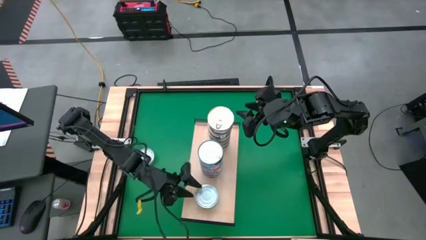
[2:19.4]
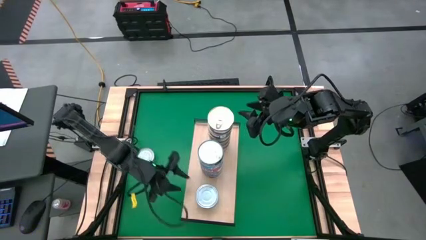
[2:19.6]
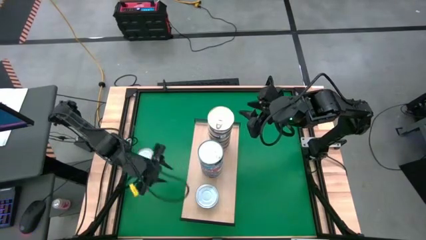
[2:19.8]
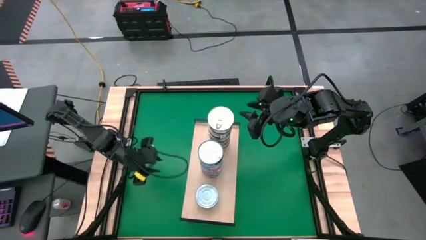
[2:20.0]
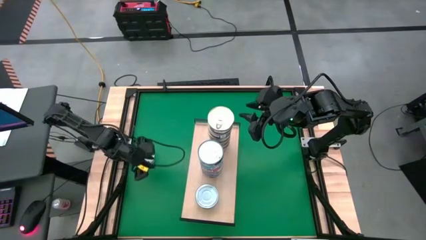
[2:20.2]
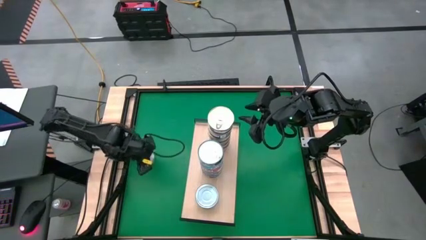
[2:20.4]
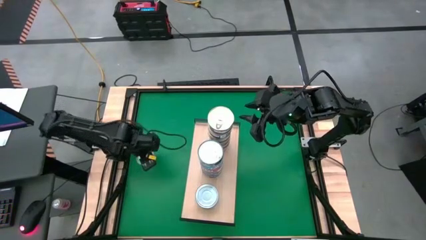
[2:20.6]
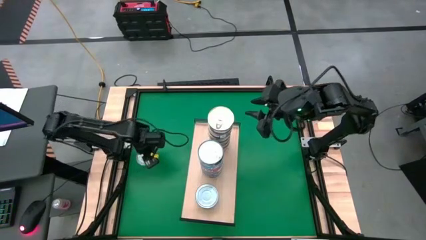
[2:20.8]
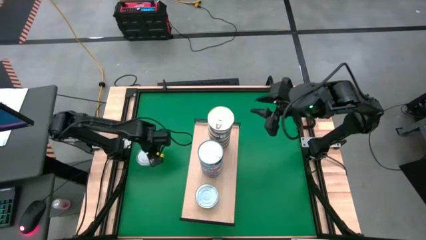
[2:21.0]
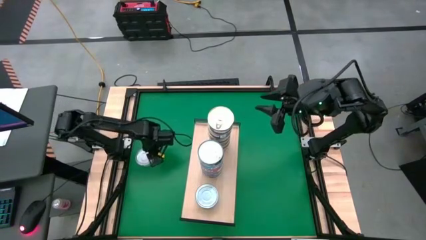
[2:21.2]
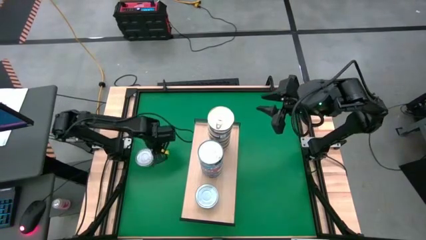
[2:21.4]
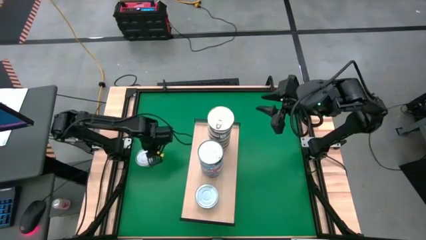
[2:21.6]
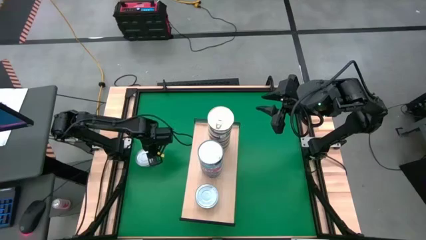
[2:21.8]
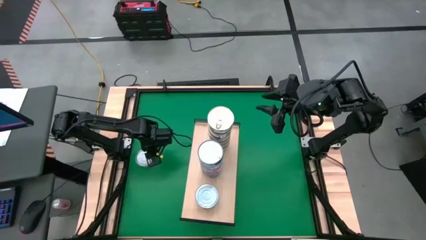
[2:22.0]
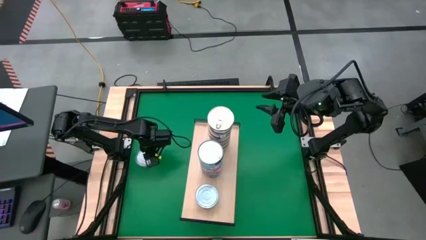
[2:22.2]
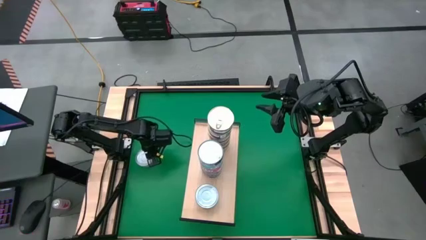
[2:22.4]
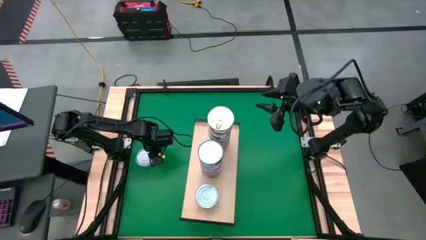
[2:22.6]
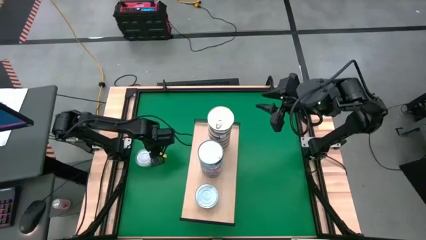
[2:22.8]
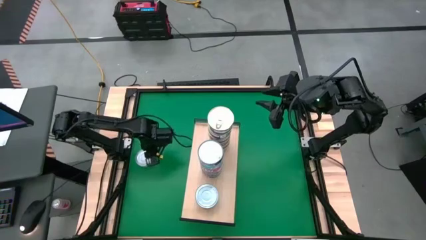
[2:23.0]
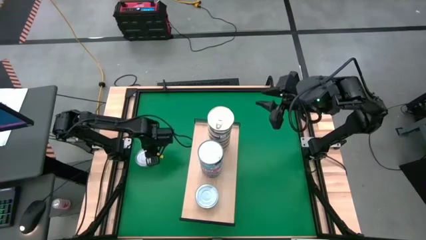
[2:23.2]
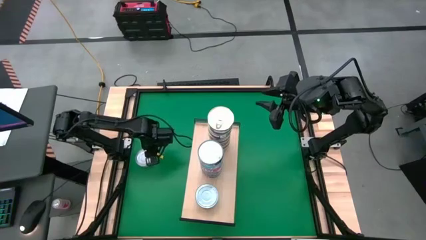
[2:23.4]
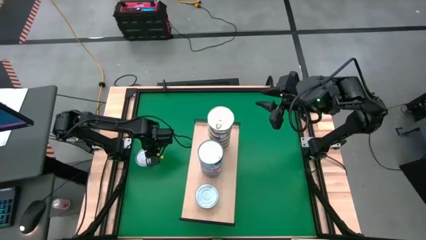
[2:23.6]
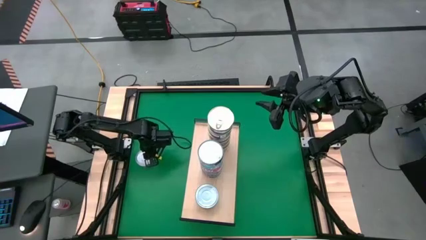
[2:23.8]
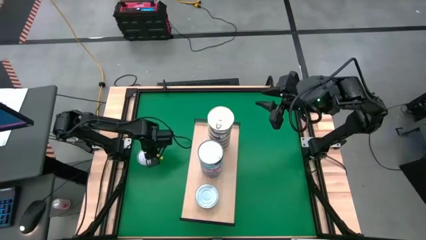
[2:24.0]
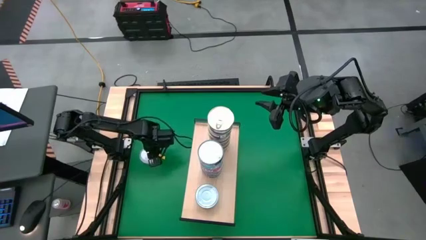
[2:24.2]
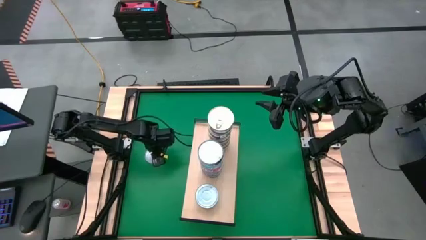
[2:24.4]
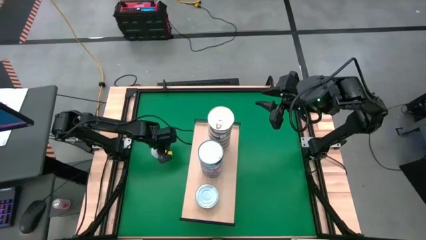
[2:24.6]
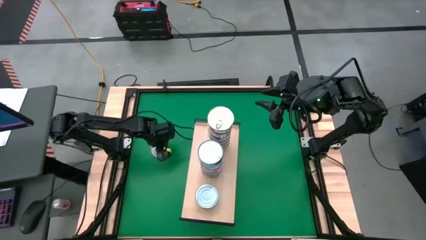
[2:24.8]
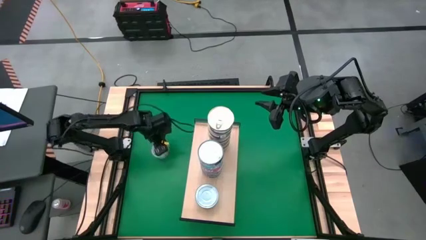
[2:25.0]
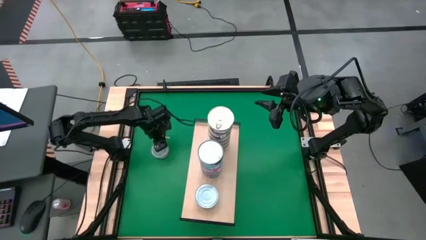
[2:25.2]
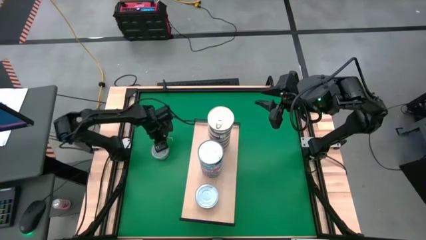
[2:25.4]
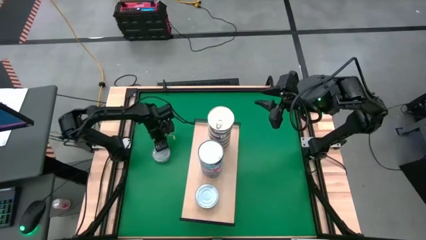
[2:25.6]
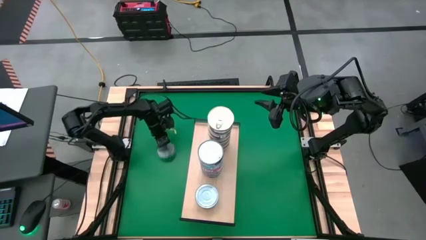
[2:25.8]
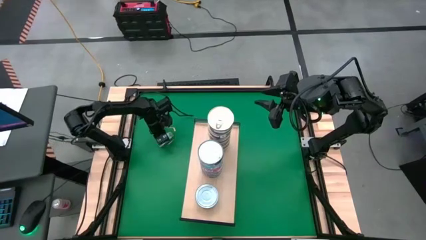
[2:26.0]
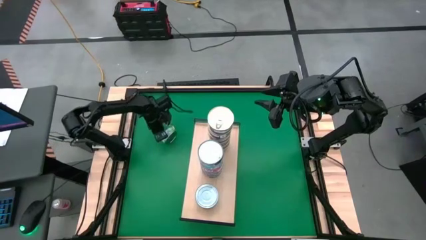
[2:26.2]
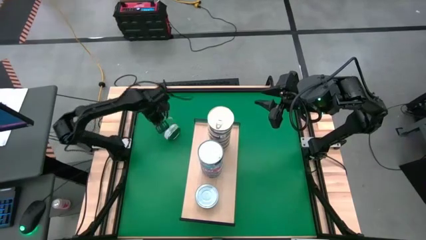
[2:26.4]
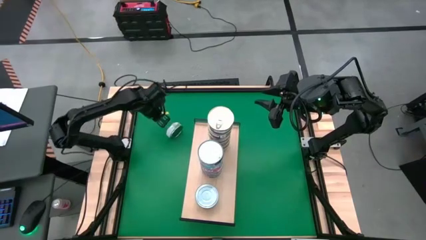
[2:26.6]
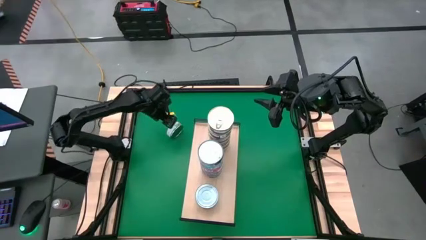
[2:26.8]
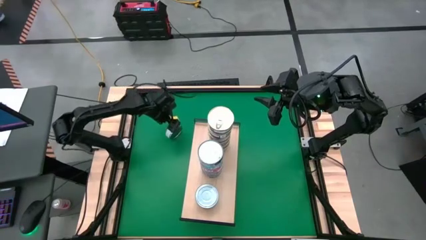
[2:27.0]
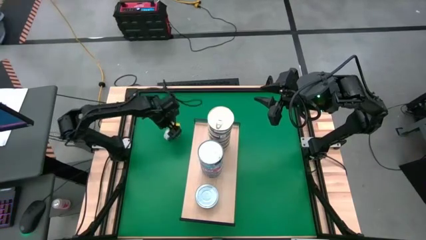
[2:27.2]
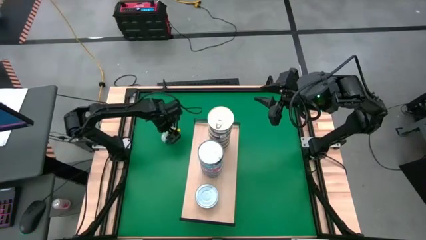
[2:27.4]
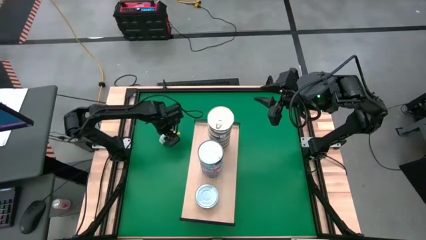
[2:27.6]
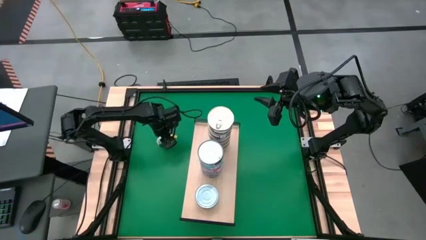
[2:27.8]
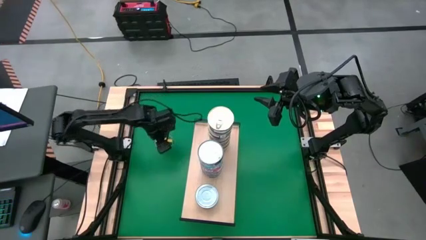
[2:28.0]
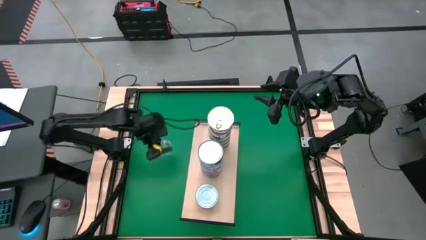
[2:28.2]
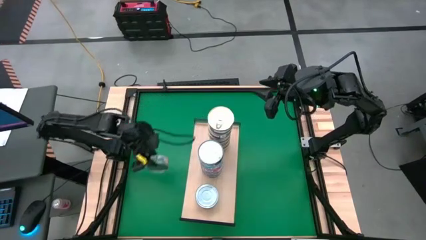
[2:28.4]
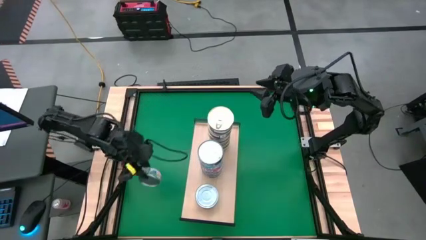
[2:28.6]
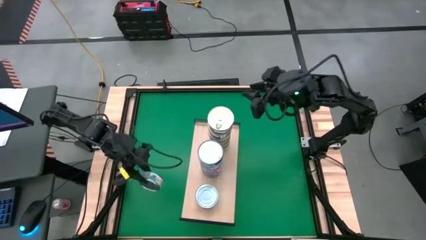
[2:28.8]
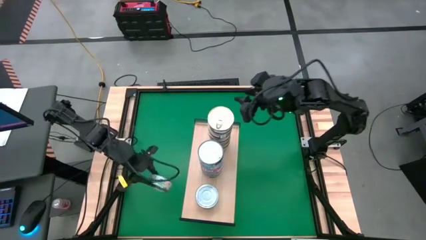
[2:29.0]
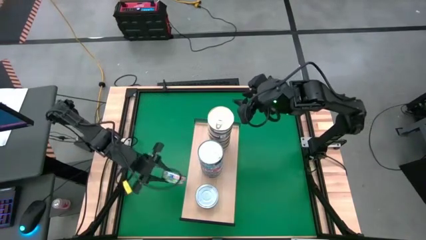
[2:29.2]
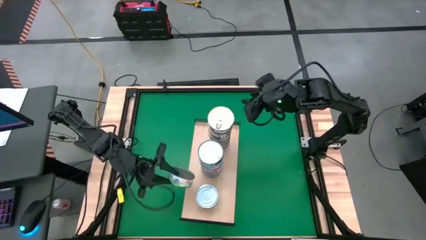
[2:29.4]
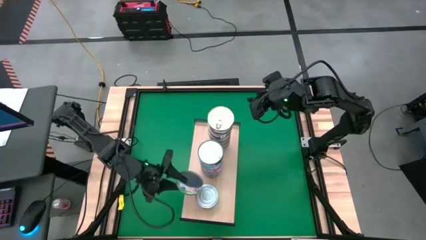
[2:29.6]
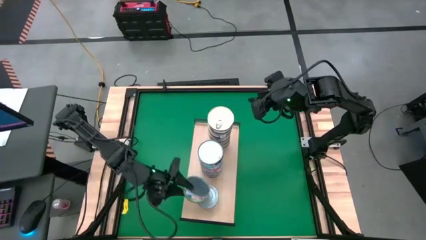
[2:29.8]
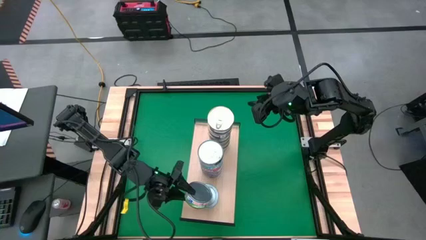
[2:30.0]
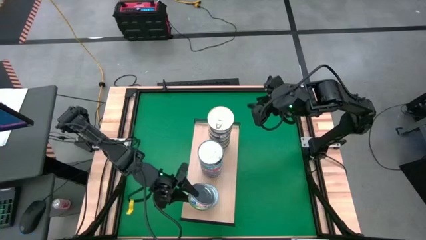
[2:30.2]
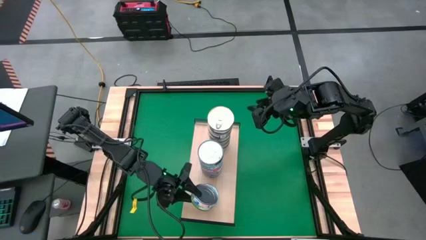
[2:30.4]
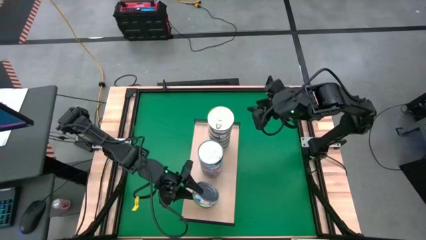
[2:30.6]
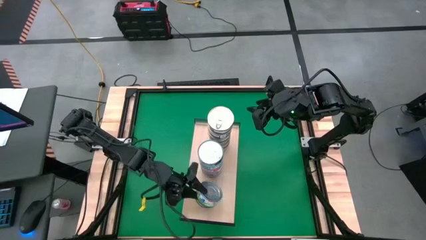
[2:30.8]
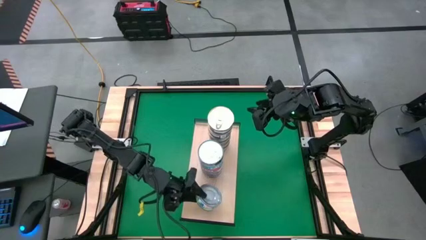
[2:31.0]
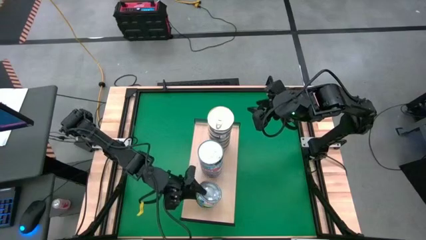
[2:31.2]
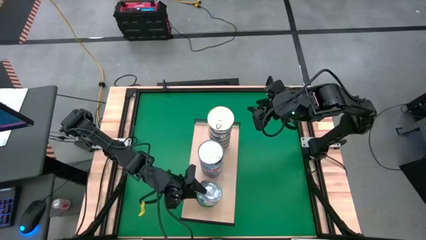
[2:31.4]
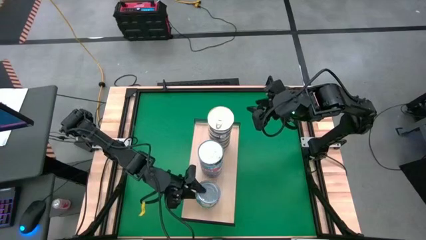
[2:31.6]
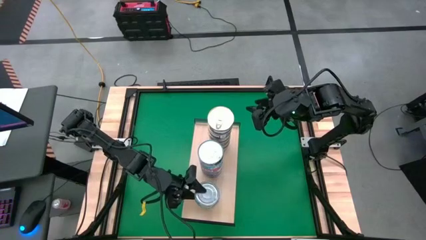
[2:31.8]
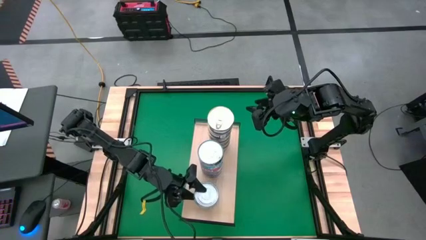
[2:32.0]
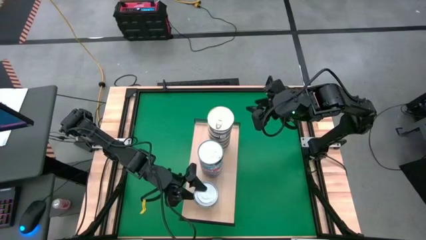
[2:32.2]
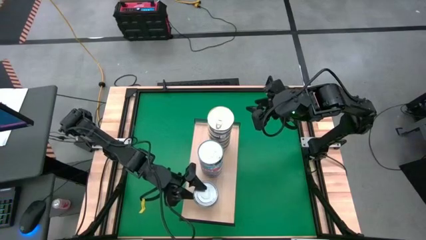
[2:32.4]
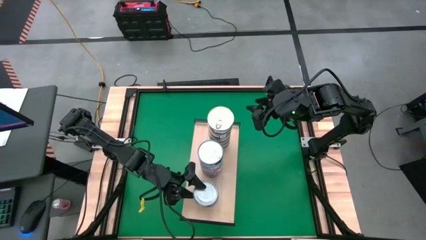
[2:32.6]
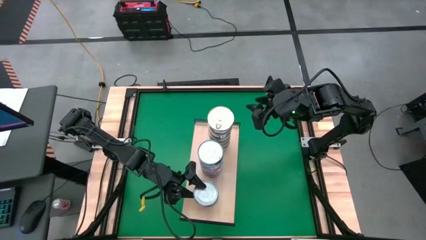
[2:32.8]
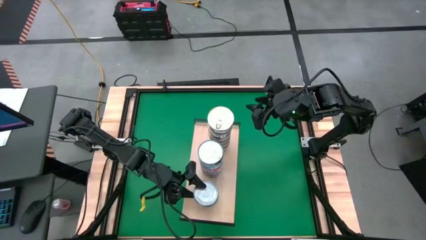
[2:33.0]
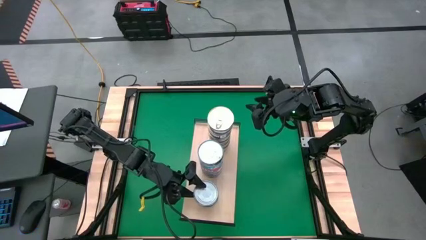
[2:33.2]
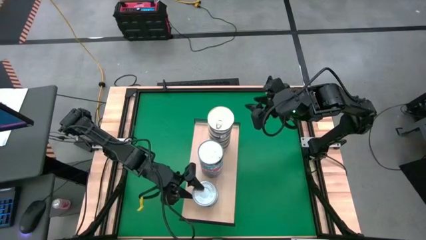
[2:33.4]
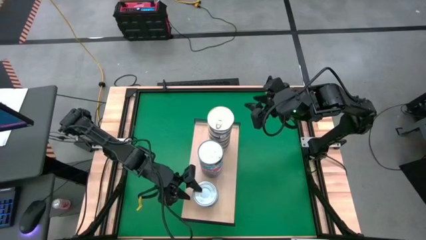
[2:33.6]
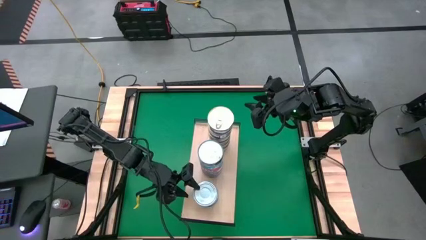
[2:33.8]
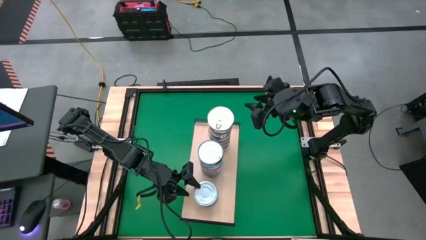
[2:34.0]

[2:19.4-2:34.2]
Task: Stack canned seafood by type on shelf
Stack the green white tuna can on top of the other green white tuna cans on the shelf
